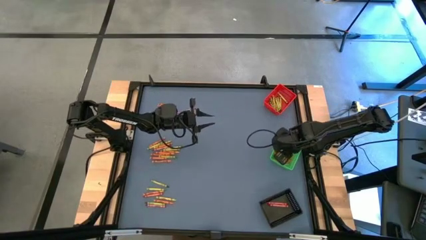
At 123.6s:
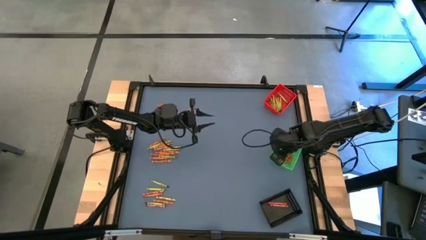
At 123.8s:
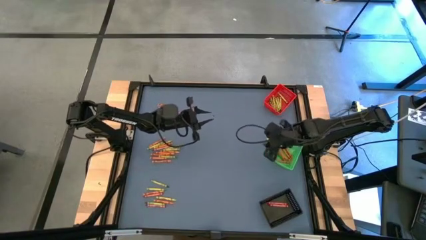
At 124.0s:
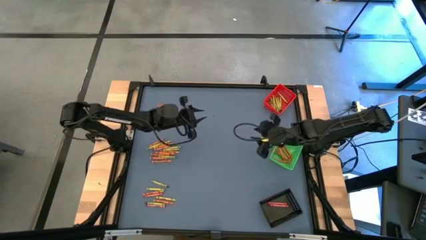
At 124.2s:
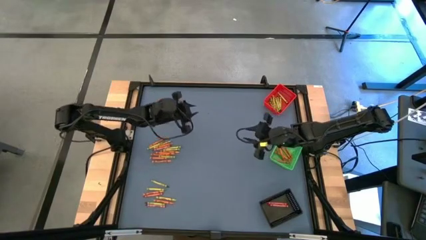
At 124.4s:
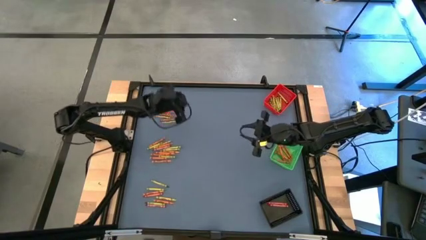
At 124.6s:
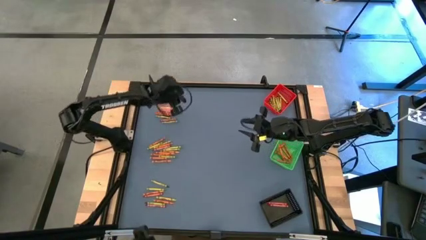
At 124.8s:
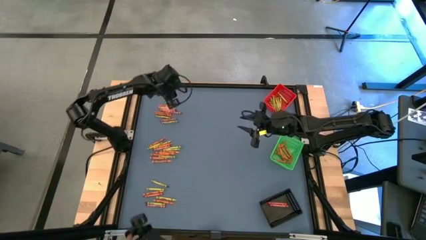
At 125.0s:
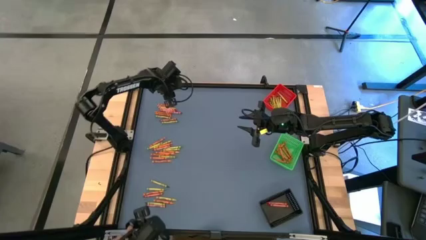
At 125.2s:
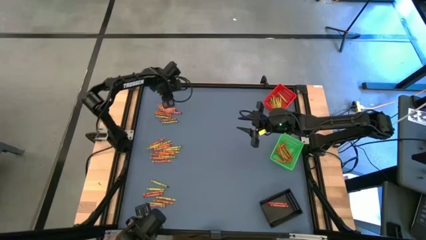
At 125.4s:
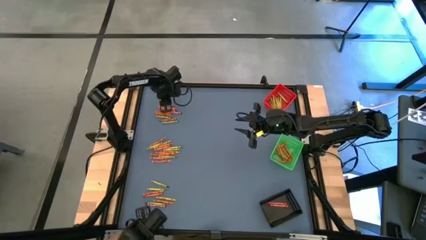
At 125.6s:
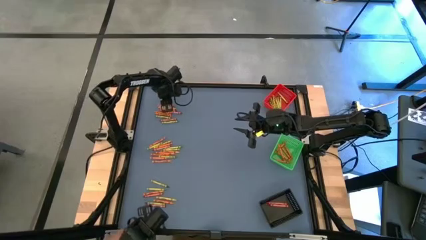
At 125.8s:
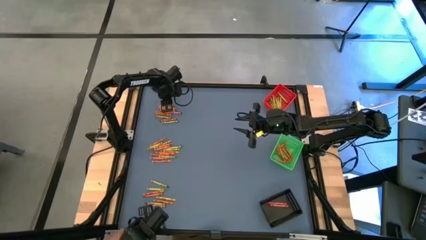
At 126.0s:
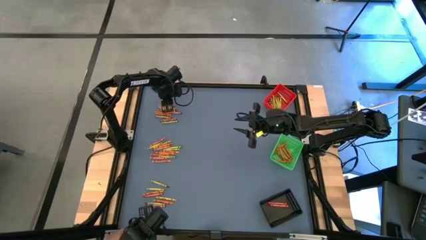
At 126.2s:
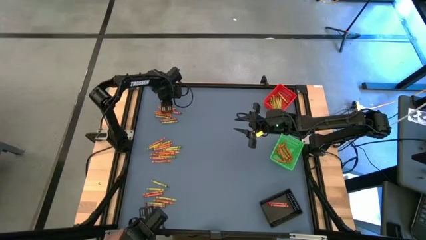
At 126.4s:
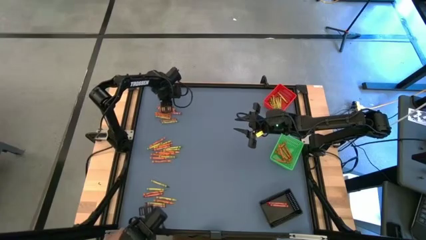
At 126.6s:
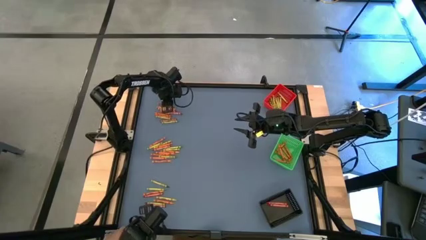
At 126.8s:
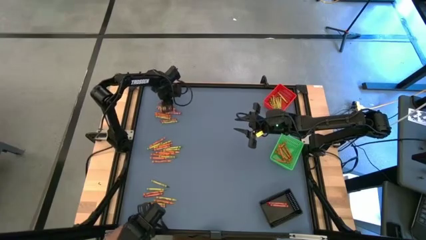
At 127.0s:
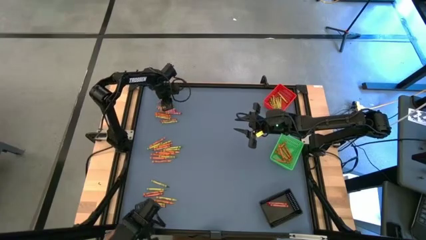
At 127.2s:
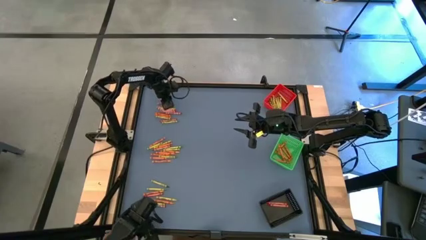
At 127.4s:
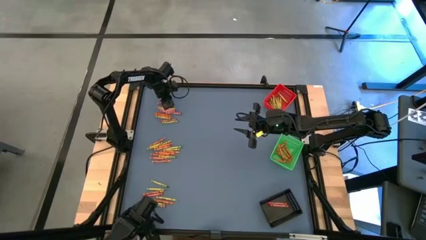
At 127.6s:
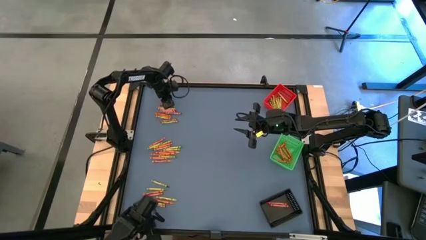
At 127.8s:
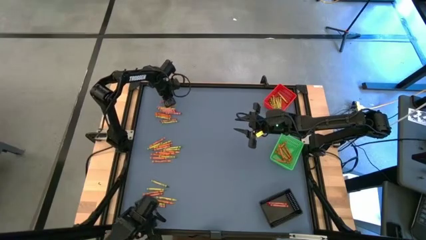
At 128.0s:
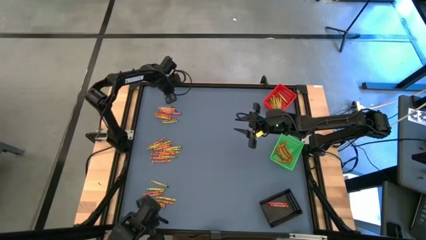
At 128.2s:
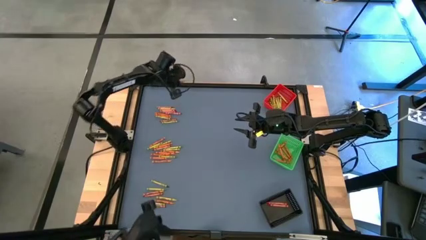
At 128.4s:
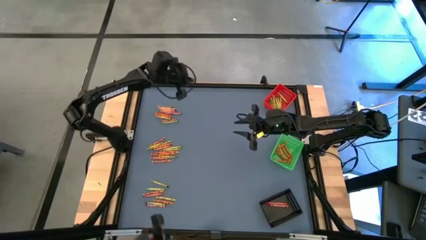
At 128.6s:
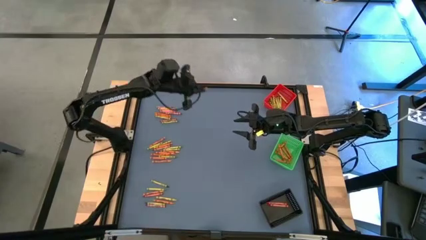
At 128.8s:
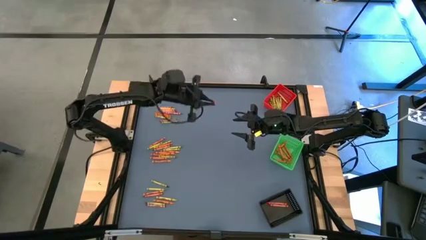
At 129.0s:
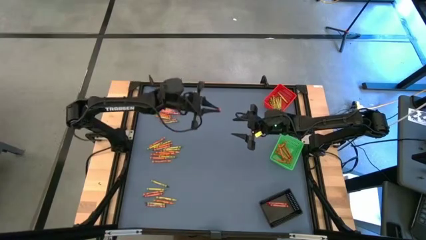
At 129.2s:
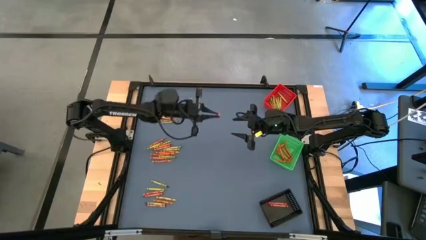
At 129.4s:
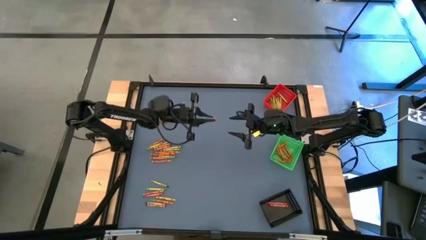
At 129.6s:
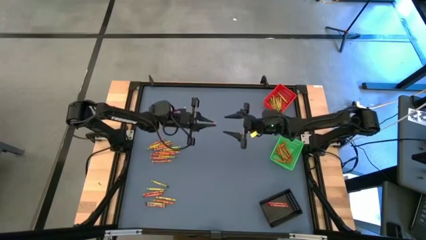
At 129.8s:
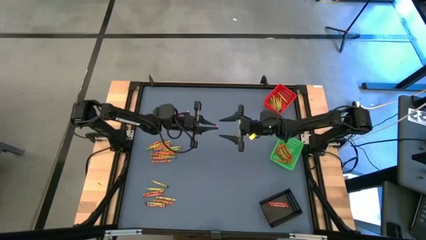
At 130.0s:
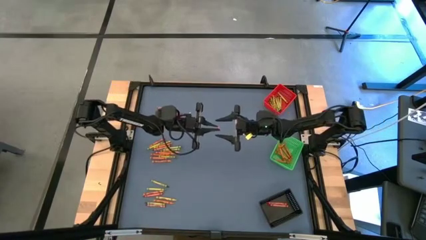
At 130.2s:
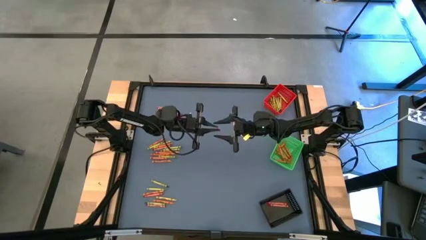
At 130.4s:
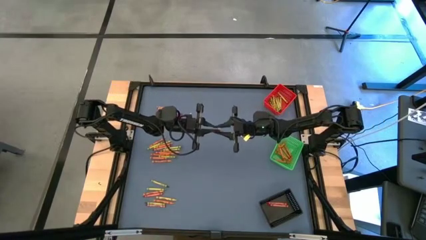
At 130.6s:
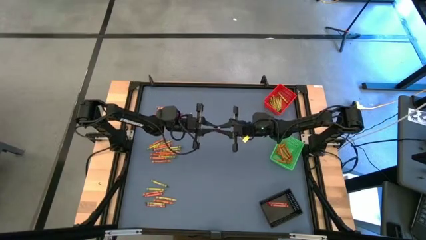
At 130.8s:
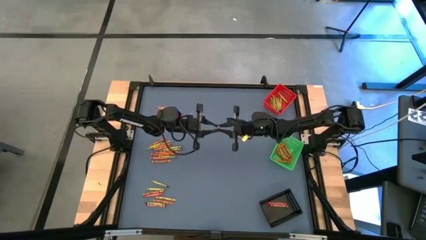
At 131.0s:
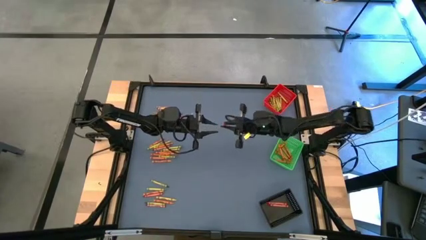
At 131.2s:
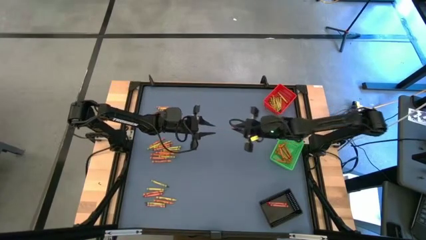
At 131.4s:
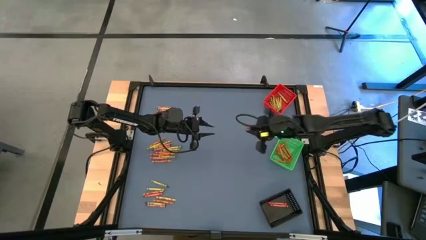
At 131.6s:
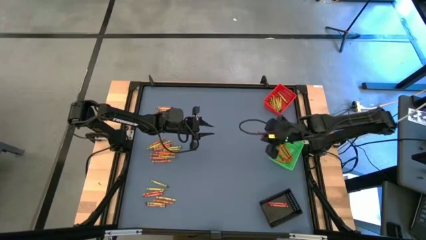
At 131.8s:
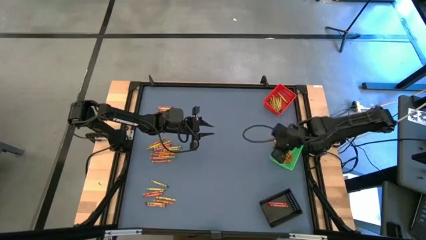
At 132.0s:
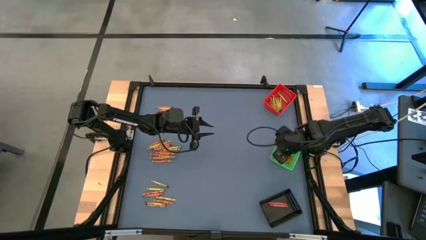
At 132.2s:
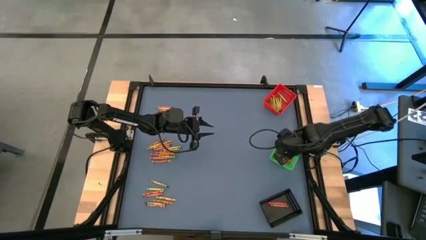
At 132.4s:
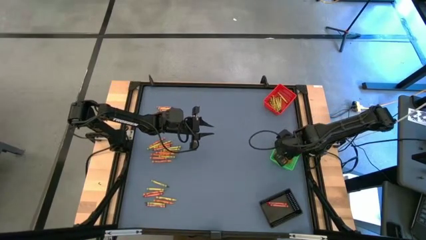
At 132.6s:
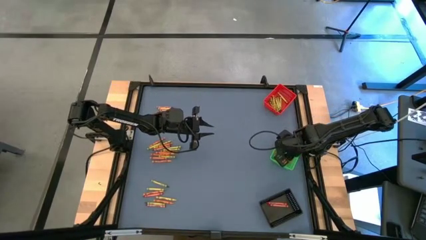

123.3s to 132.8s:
Task: Sort crayons
Put the orange crayon into the green bin

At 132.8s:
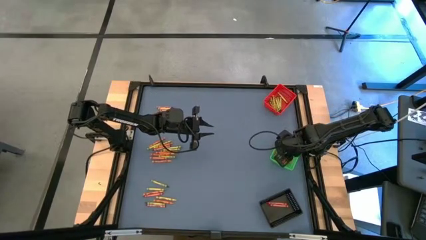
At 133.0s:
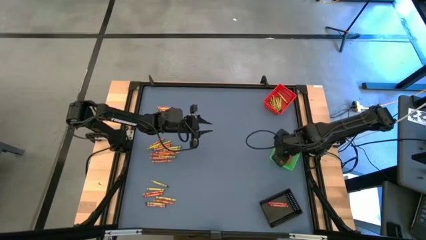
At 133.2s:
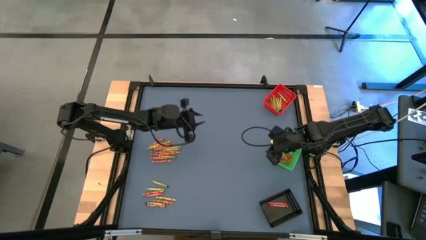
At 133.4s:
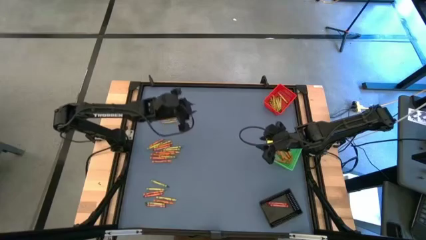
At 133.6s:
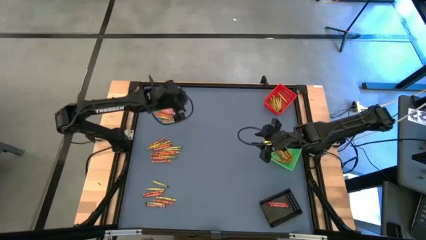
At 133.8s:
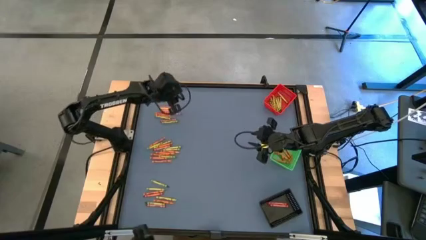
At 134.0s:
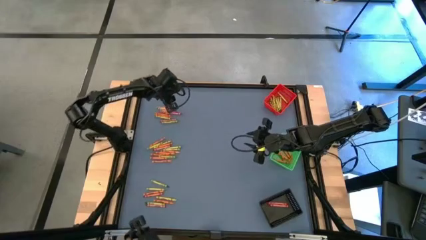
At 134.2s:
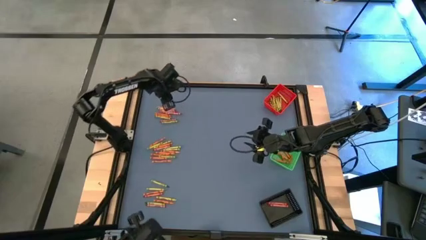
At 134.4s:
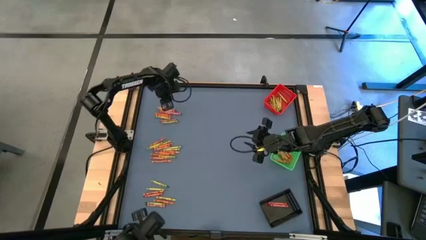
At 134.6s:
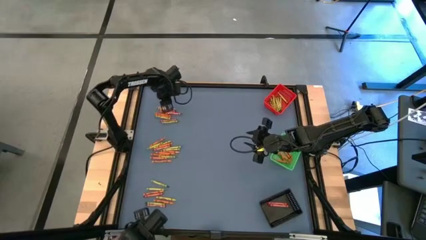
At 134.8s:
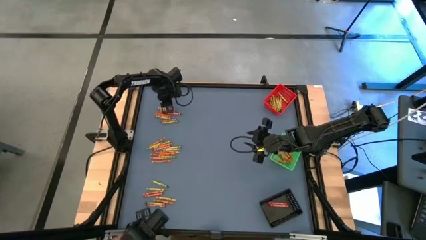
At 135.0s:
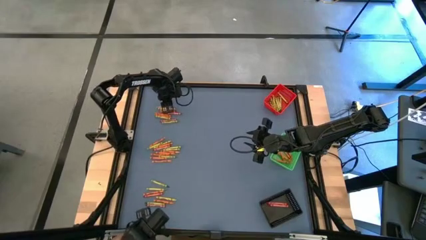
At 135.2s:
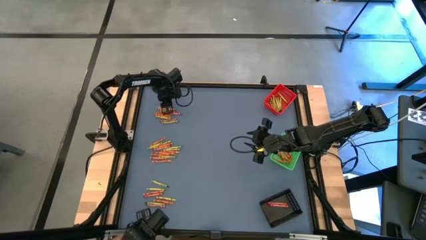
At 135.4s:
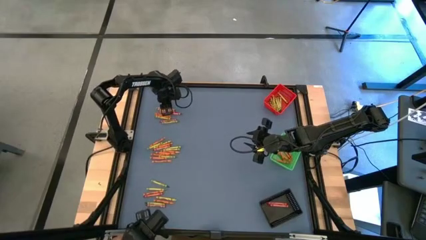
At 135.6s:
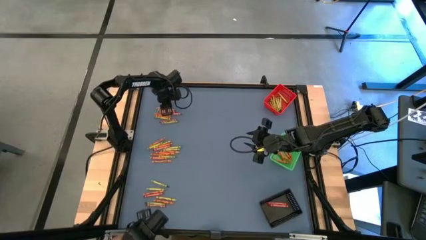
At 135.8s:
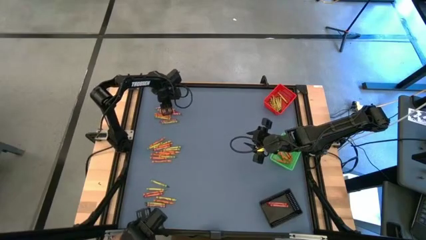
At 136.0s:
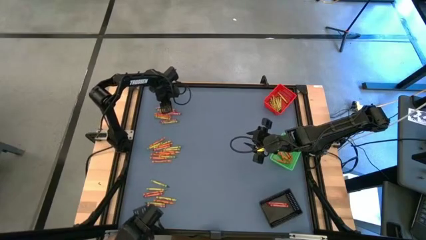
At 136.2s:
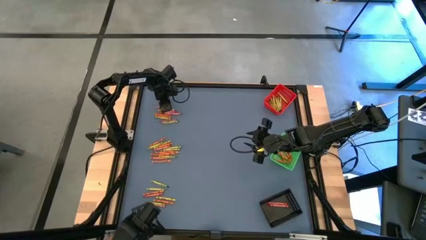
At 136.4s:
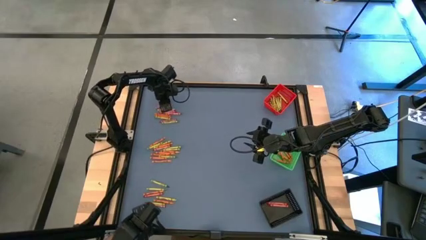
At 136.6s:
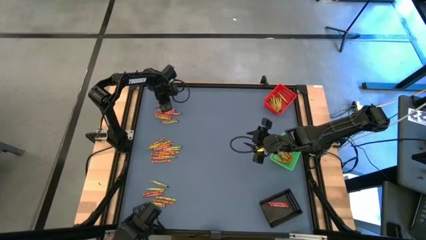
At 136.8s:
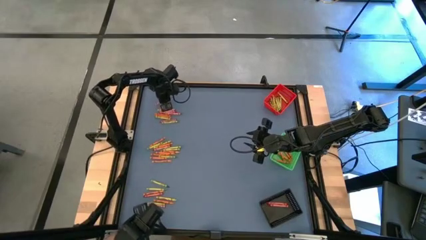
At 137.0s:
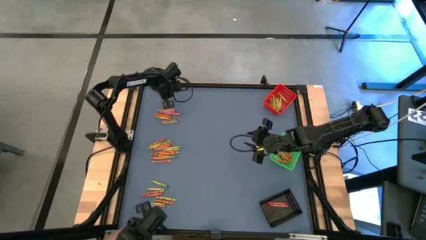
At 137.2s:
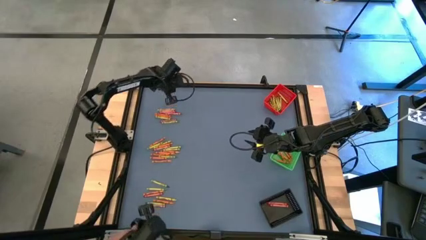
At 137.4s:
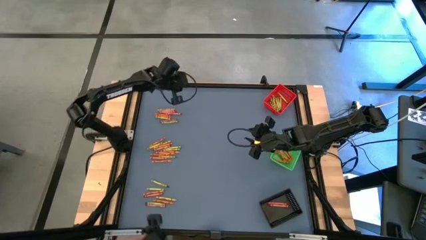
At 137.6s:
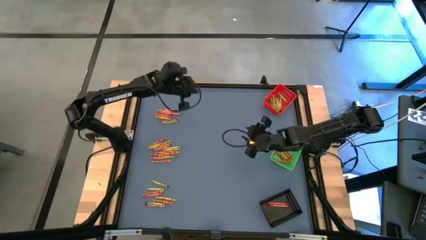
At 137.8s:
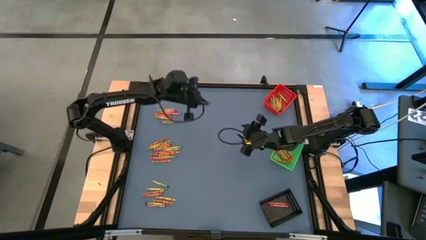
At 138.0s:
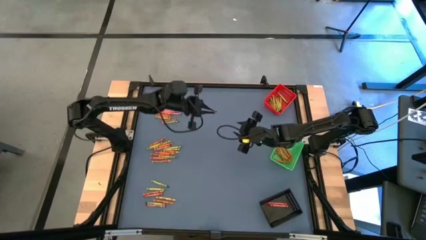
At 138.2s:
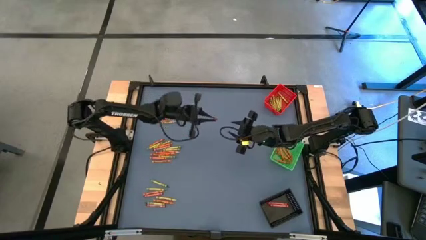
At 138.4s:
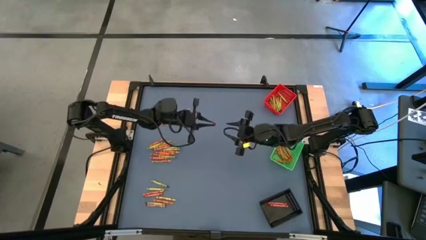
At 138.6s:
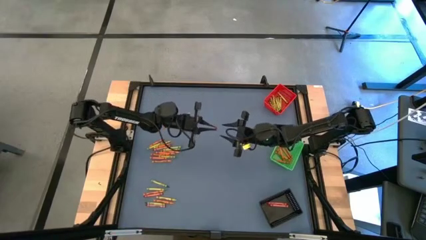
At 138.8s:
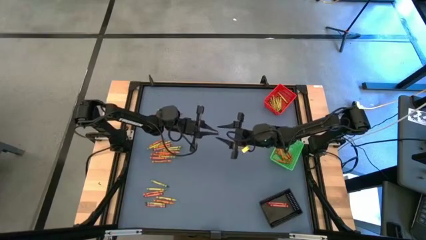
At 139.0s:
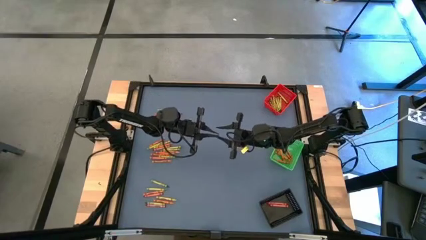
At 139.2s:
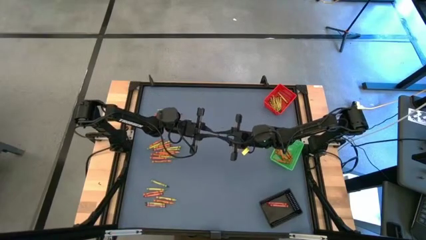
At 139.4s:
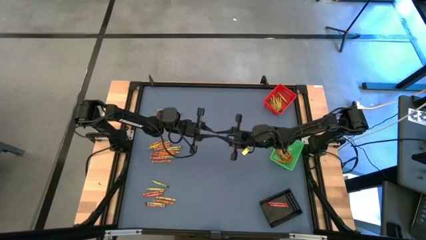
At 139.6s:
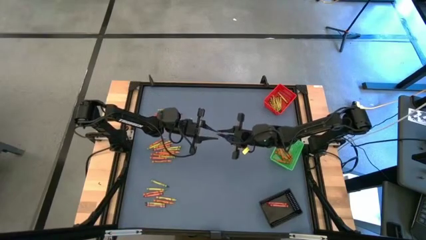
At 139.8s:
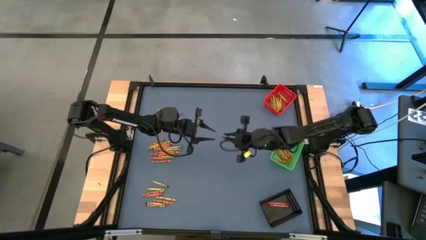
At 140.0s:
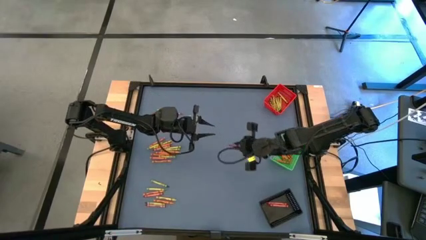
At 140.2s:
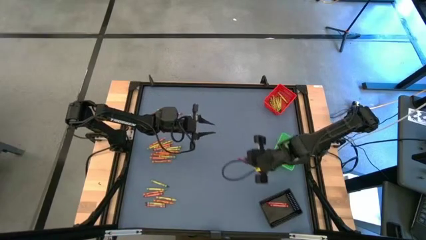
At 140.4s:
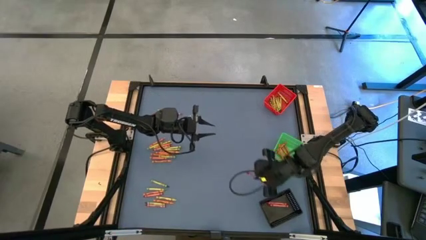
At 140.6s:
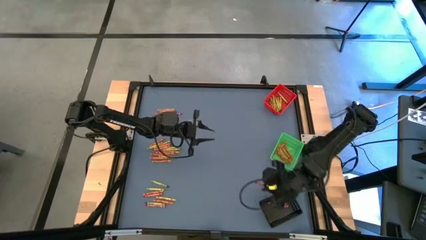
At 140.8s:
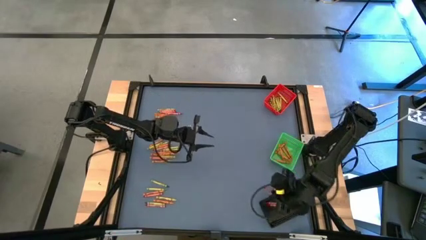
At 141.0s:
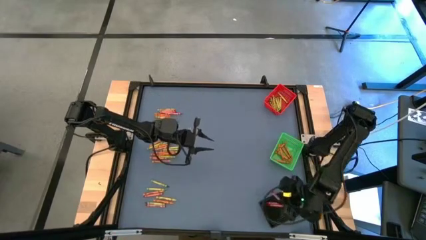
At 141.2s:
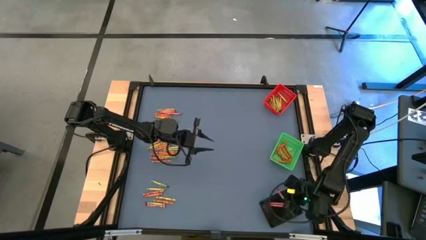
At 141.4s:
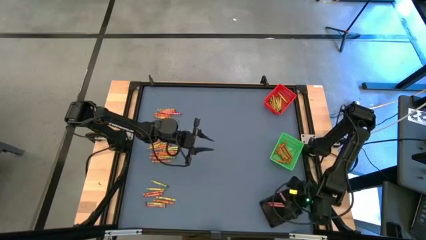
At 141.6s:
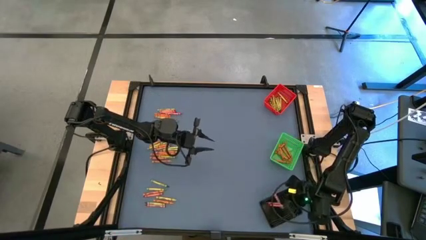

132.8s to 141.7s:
Put the red crayon into the black bin
